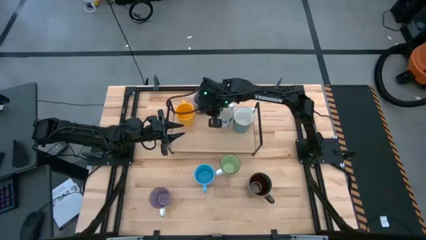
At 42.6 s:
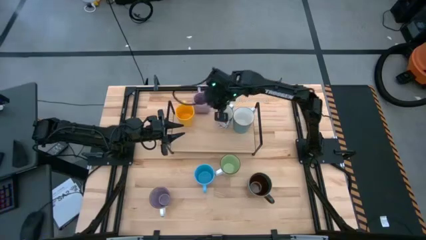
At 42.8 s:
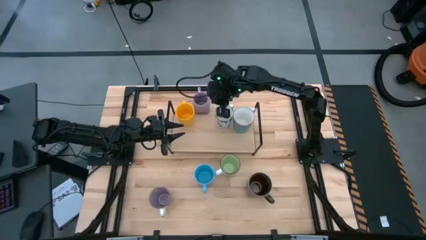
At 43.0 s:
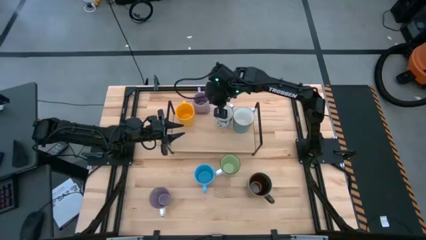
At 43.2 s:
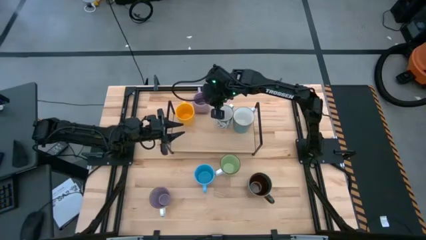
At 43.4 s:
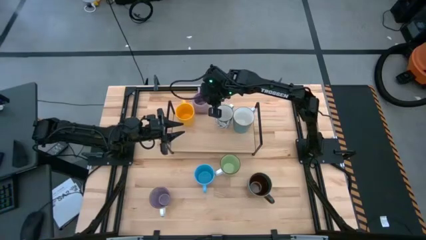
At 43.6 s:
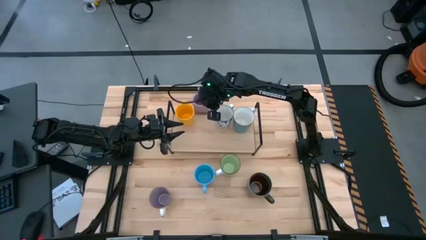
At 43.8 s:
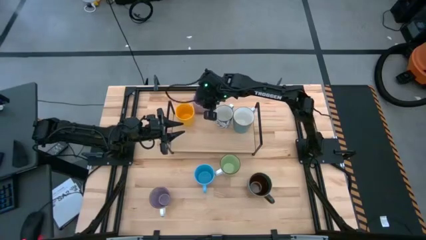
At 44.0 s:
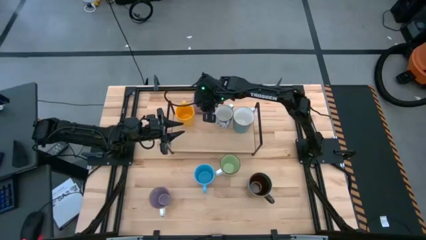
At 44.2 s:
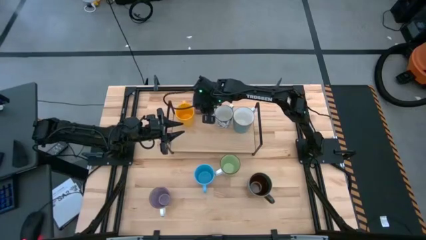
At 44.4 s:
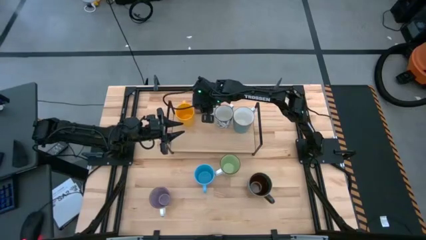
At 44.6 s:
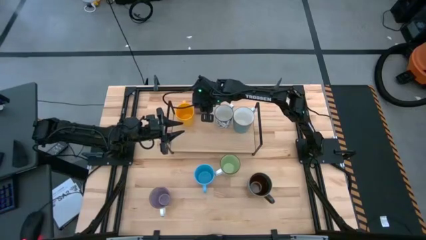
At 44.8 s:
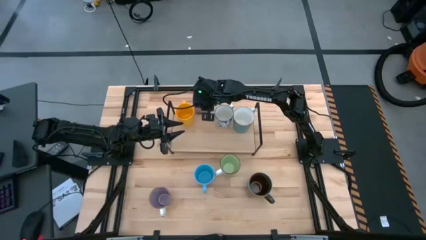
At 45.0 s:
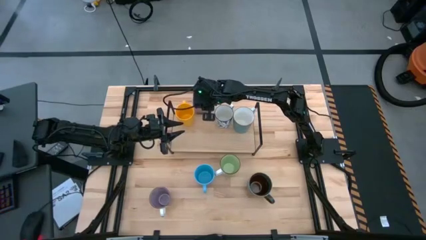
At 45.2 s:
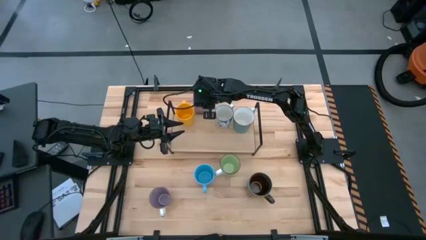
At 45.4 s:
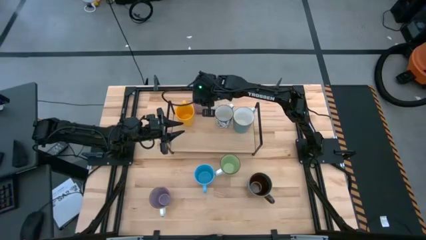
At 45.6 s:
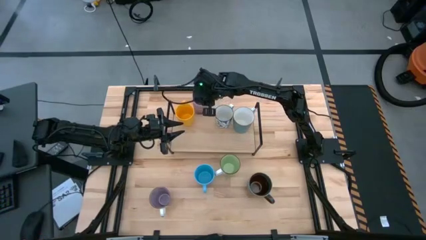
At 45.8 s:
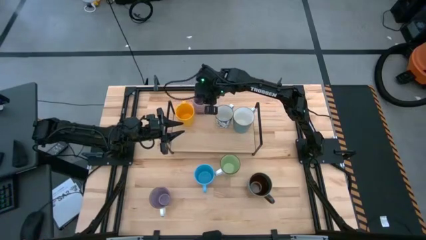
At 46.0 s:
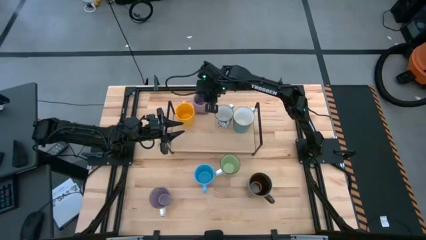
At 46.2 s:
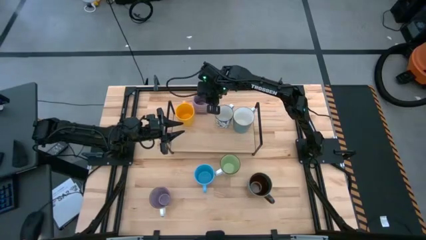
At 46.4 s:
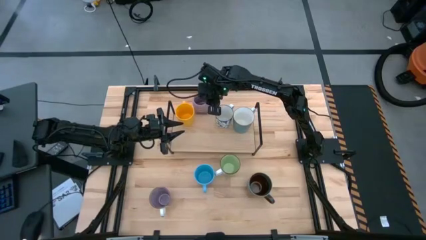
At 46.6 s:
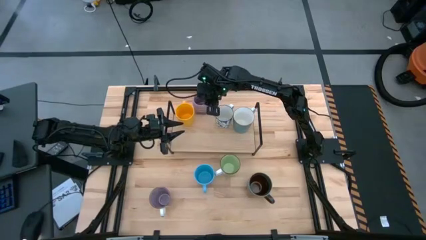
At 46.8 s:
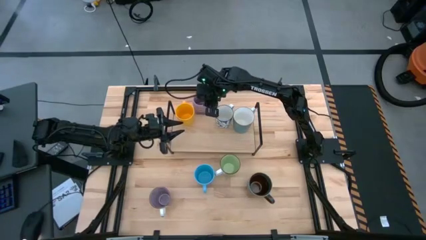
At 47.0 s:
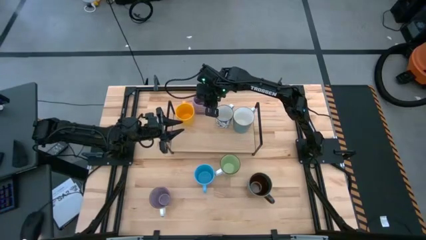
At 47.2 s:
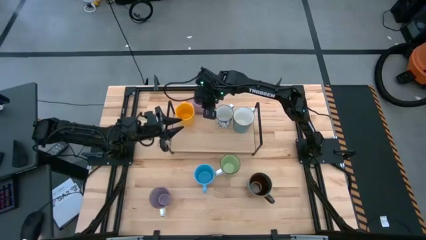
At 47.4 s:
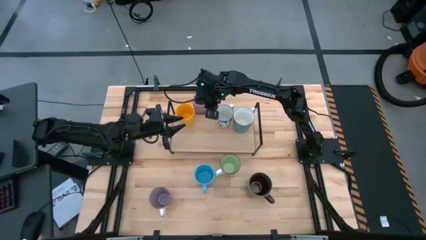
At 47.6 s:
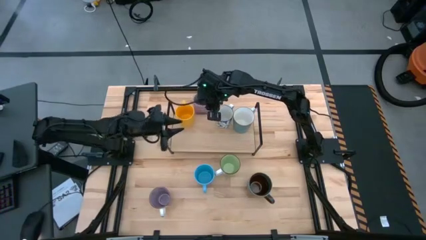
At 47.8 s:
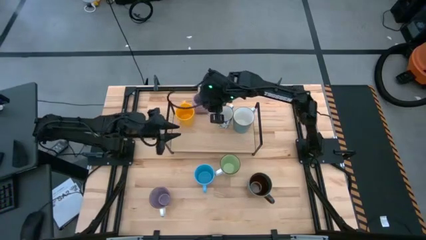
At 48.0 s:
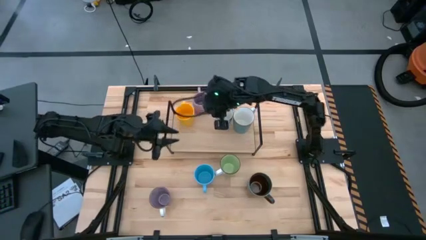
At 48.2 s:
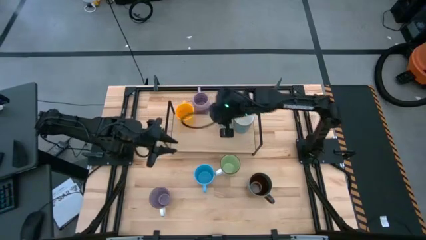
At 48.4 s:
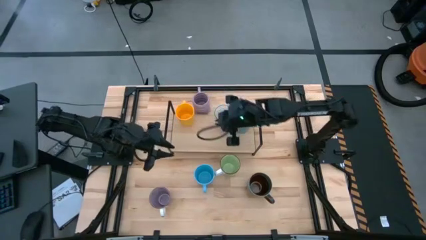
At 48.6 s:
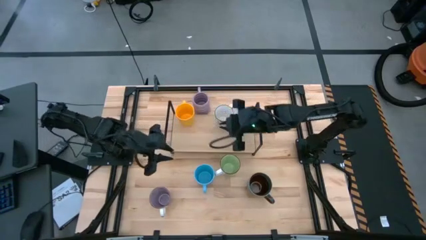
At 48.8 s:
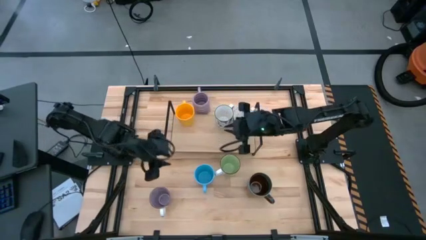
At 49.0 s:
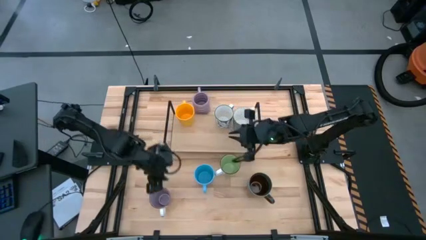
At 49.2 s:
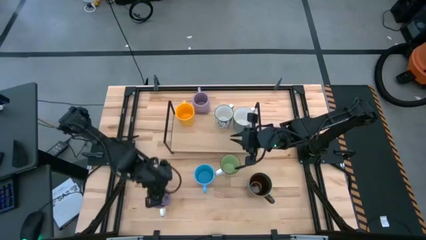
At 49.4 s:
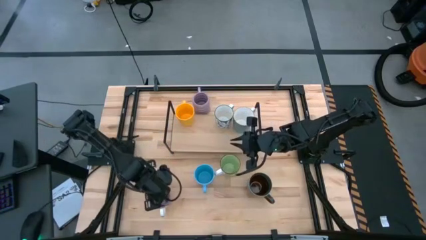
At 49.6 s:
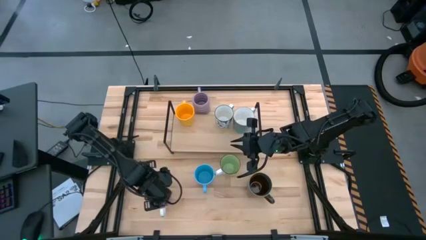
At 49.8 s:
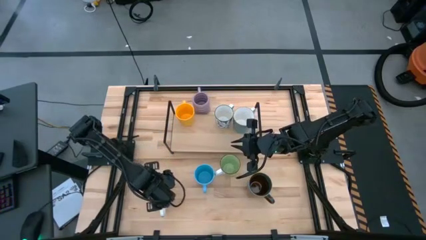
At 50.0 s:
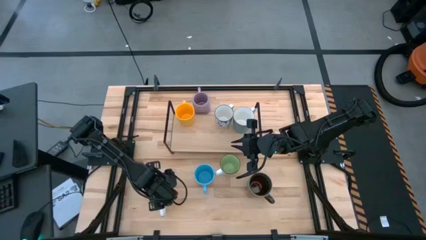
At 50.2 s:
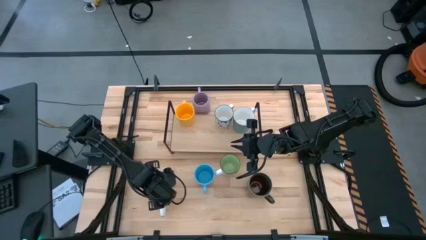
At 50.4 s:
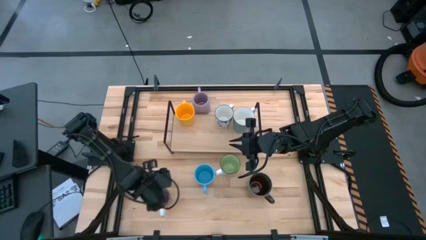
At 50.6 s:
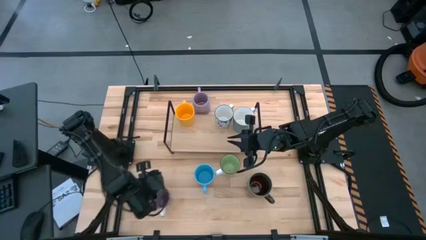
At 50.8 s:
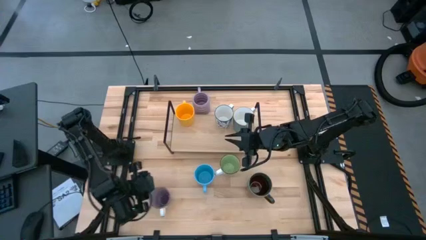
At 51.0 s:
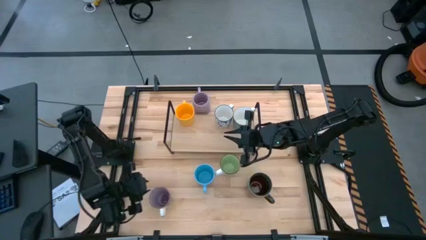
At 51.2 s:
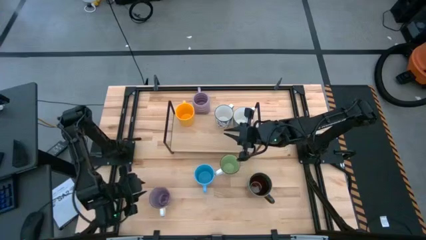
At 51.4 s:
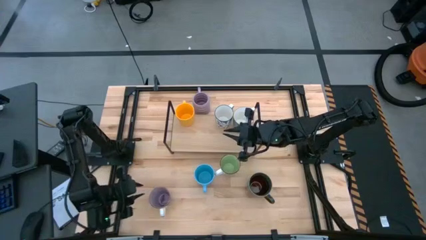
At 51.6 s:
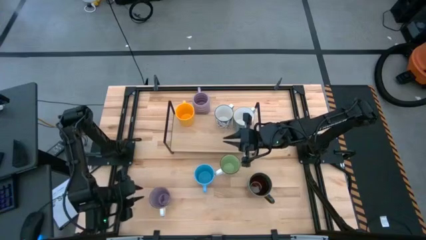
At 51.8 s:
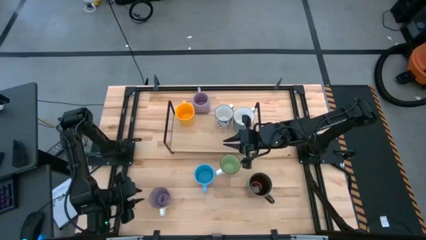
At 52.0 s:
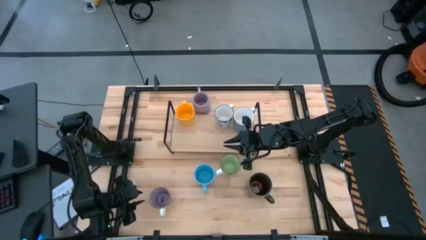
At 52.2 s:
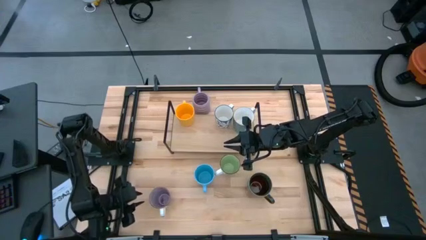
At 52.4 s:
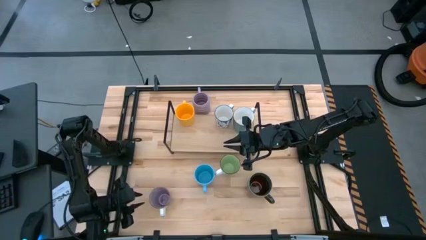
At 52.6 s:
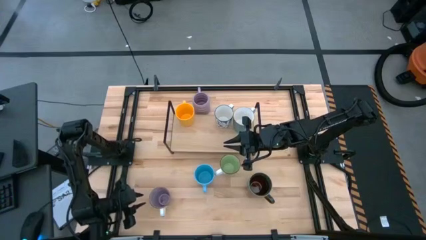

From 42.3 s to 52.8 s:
Task: Place coffee mugs
Put the violet mug on the shelf
